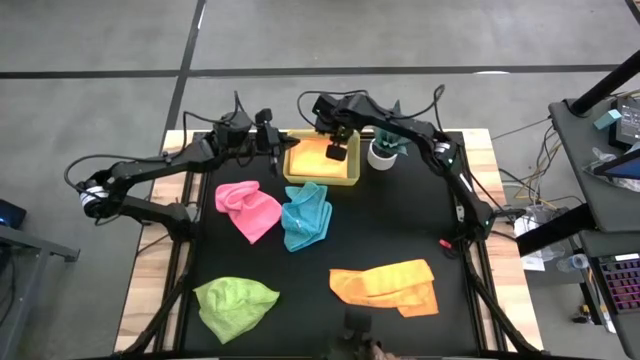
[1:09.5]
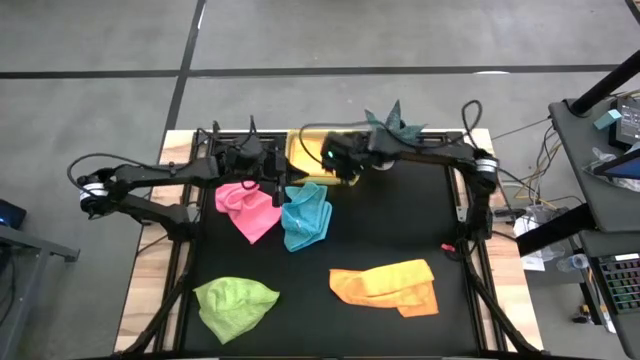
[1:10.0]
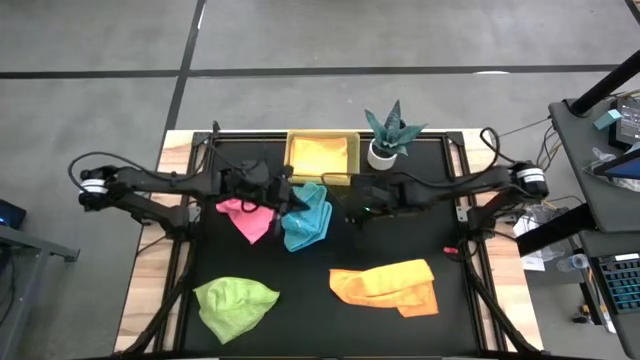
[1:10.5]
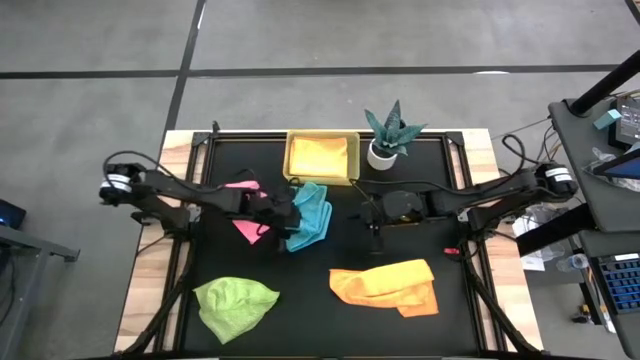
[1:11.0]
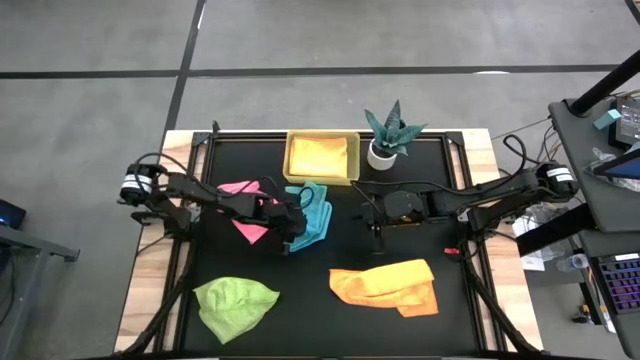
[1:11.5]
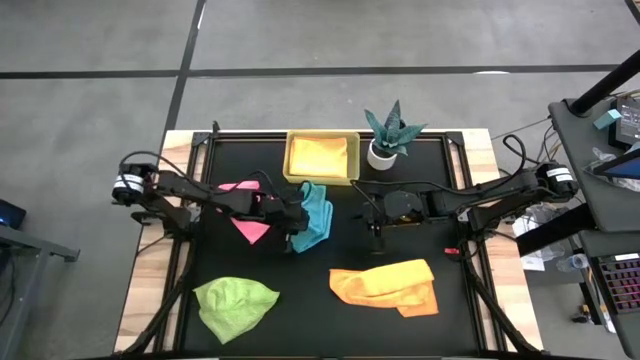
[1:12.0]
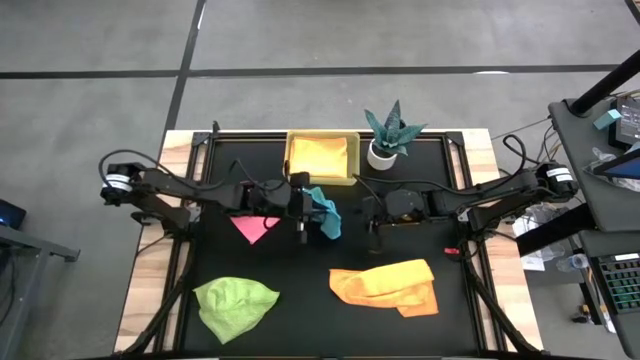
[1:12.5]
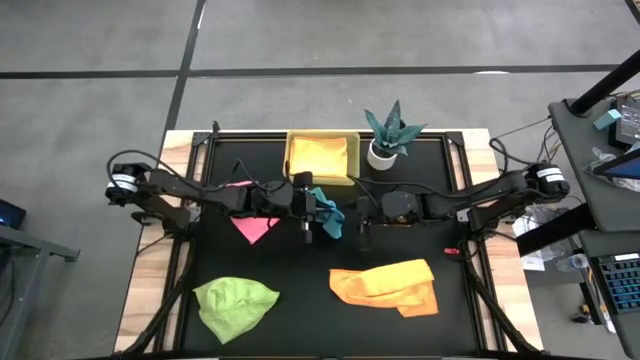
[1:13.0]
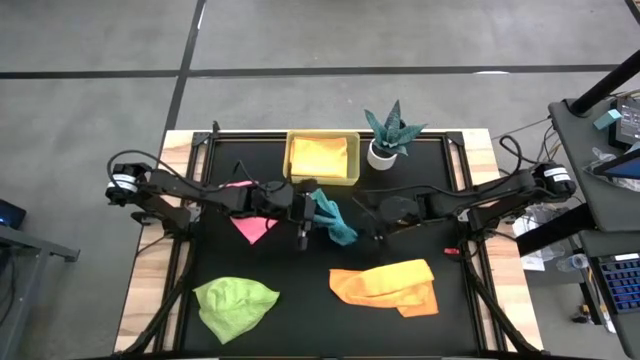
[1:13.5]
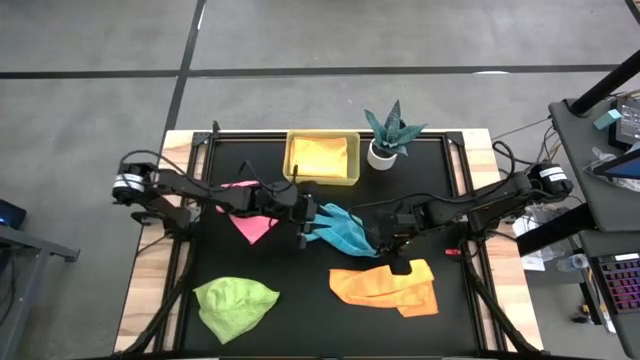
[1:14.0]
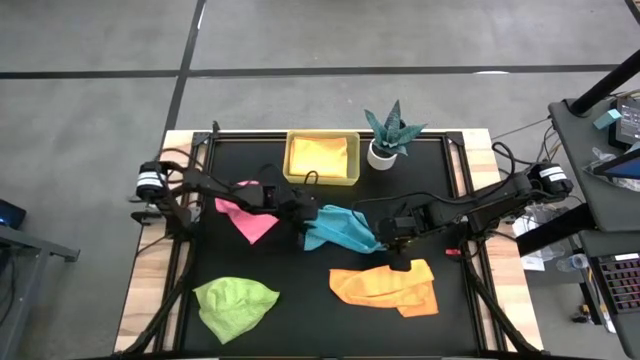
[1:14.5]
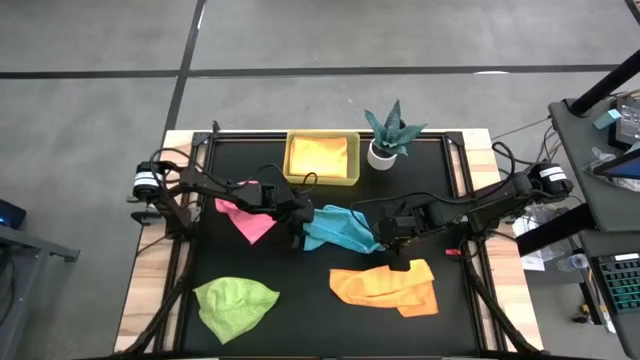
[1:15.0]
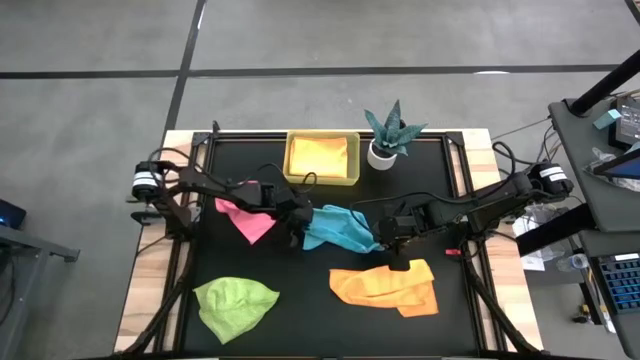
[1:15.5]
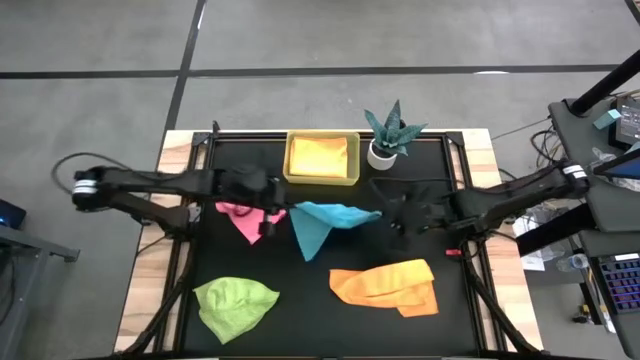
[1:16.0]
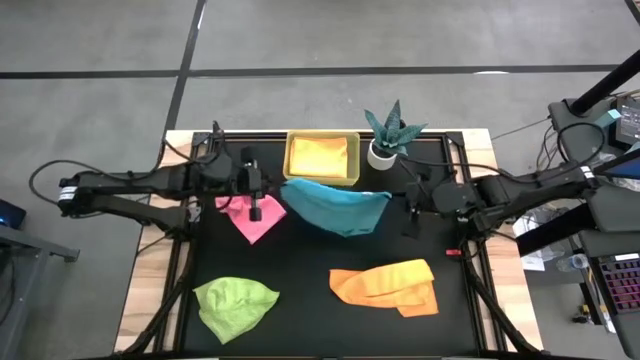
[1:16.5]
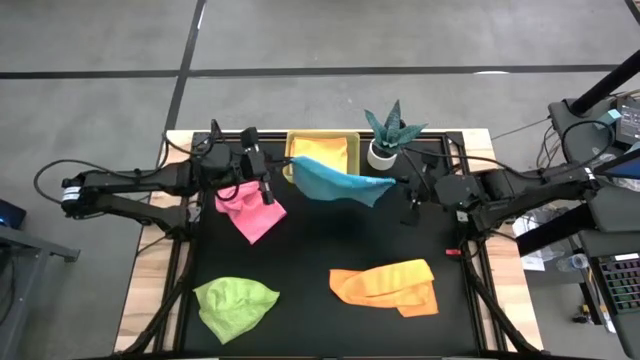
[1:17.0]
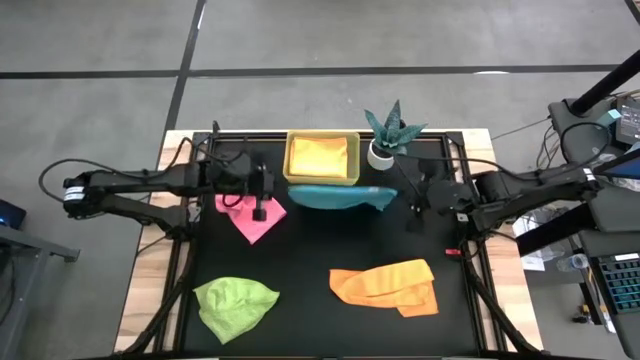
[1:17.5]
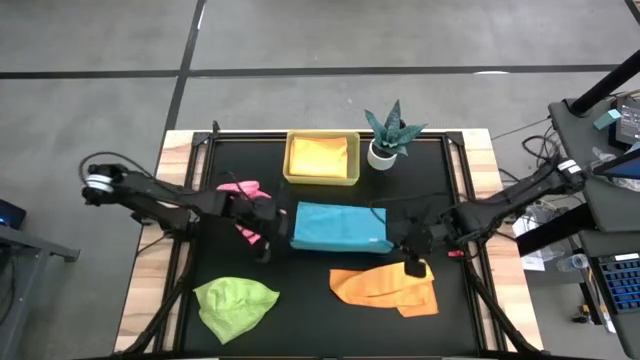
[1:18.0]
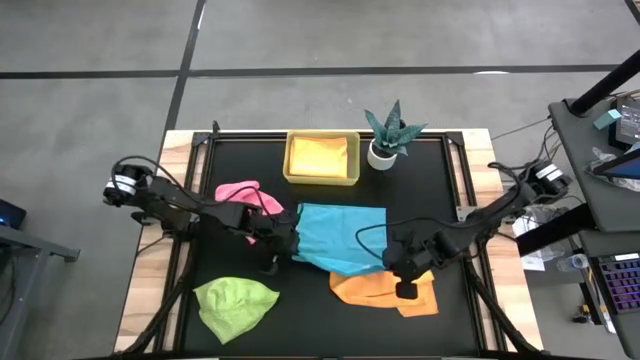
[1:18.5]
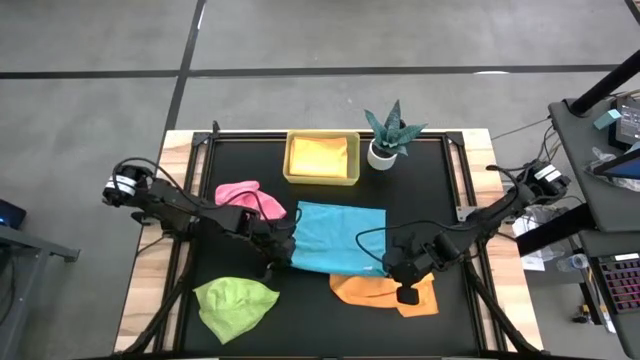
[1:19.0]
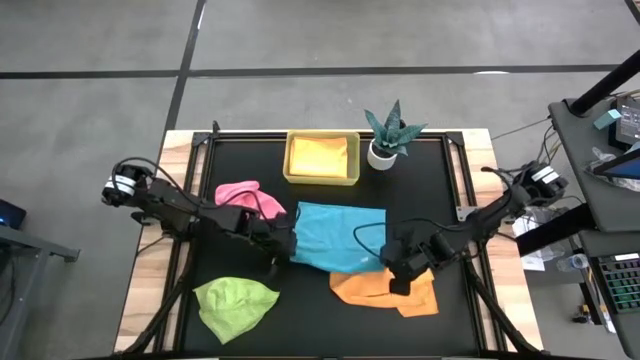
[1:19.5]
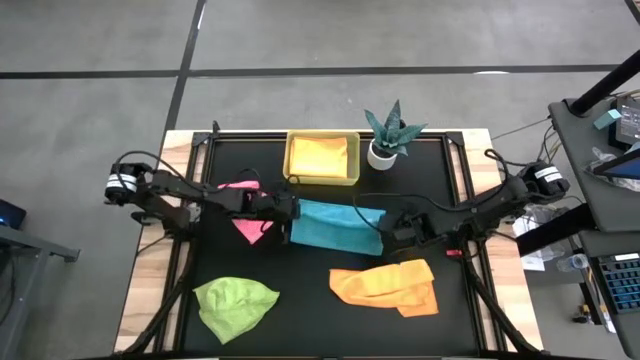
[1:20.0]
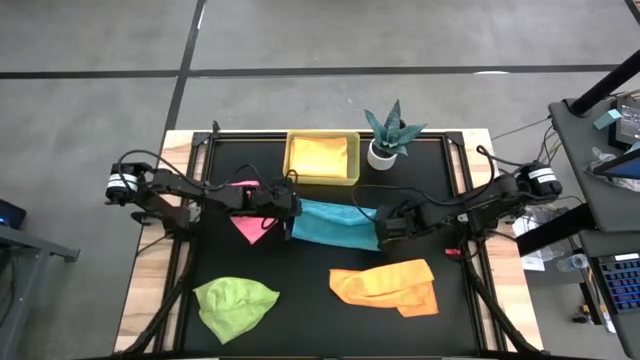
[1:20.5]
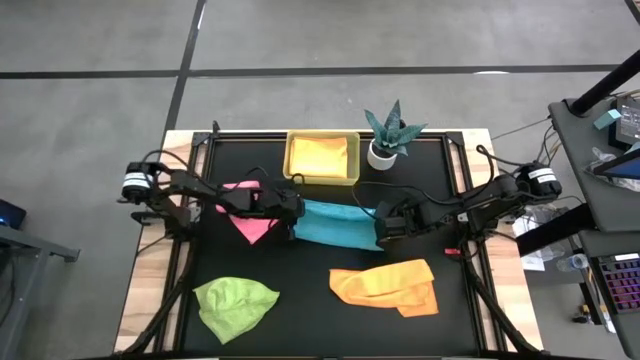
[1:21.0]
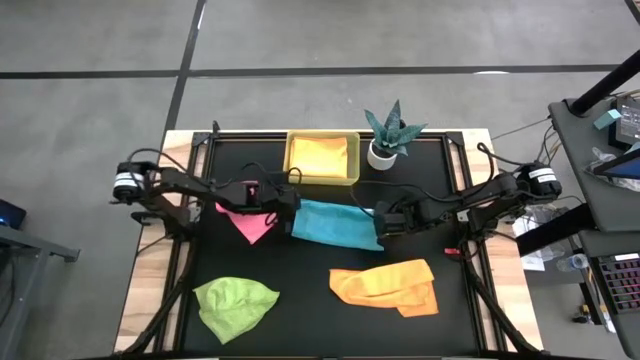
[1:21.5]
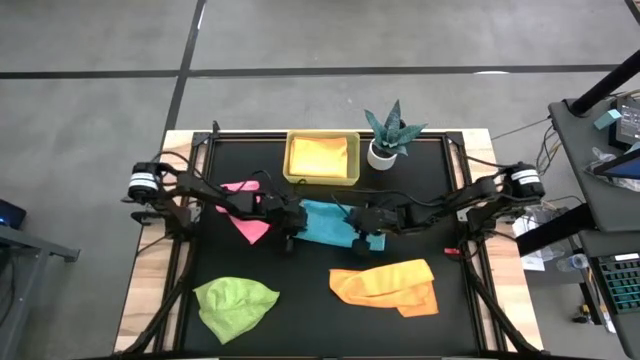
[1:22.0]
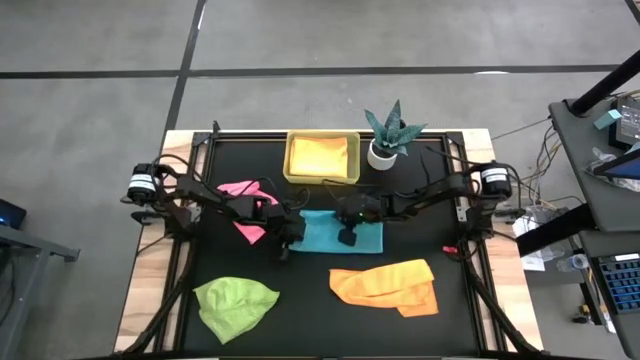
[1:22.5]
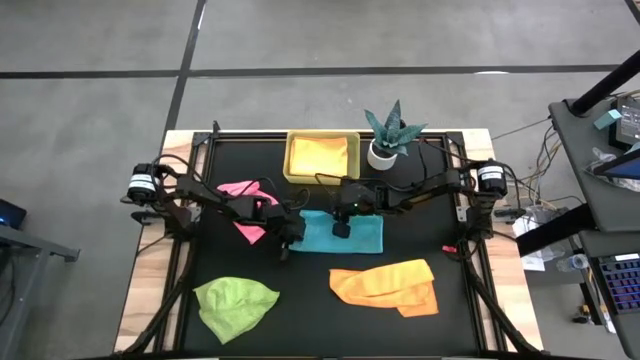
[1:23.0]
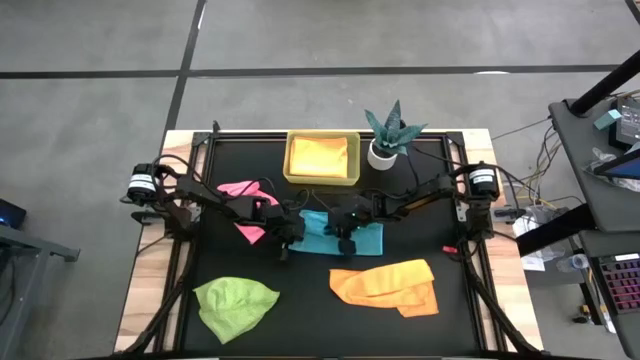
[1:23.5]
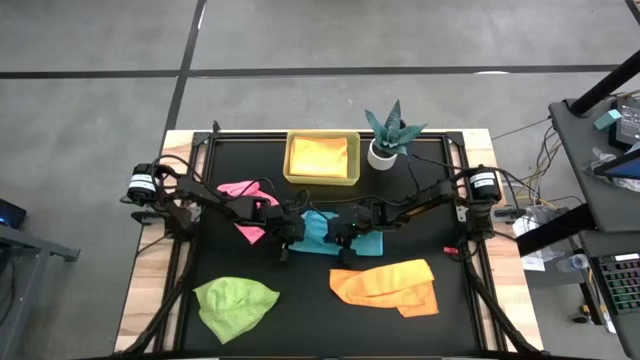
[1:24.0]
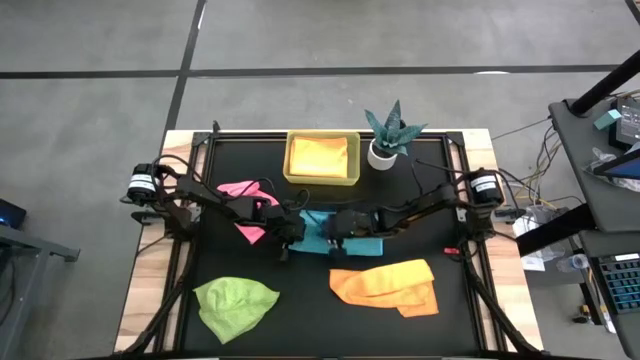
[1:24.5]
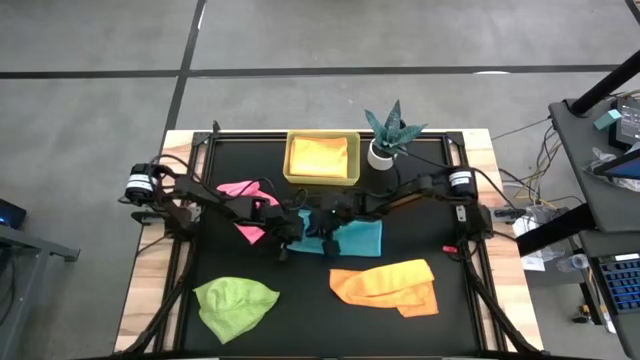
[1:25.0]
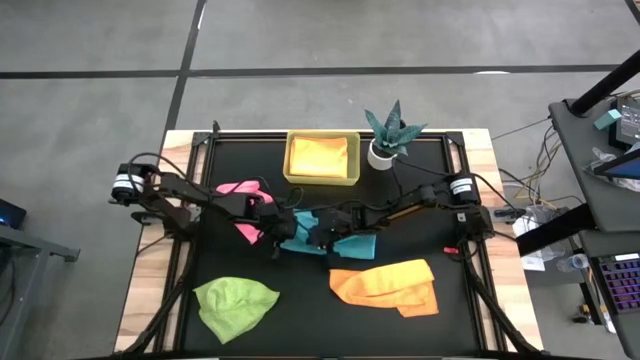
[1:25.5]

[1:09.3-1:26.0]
Task: Fold microfiber towels
Fold the blue microfiber cloth

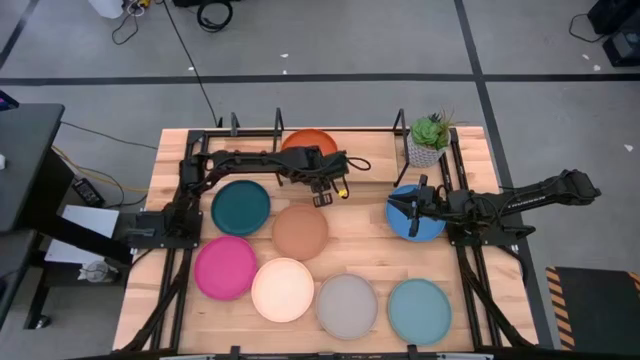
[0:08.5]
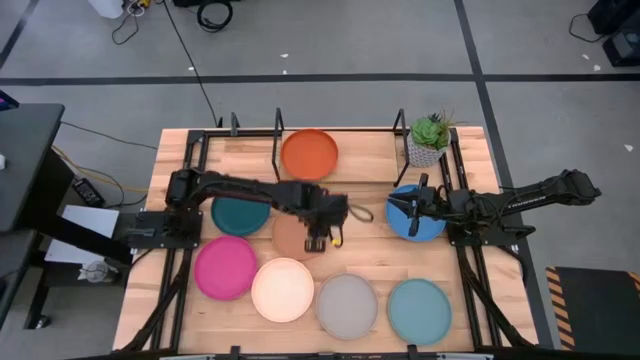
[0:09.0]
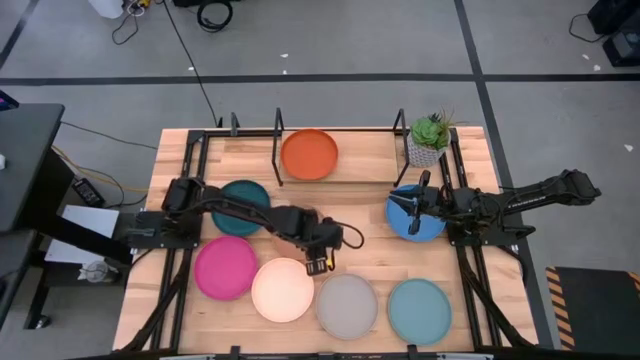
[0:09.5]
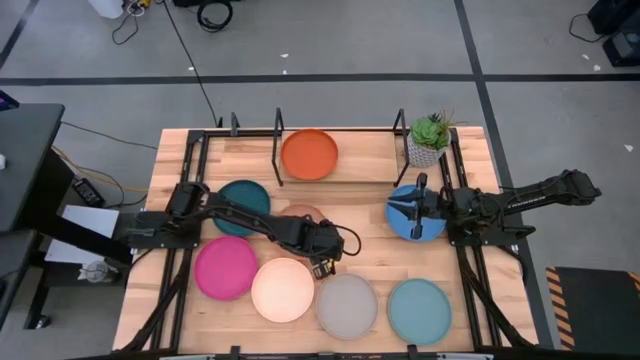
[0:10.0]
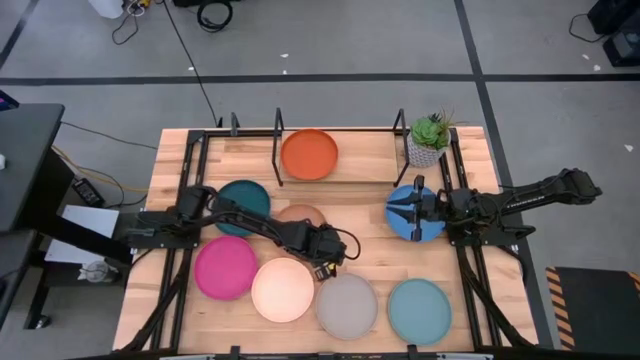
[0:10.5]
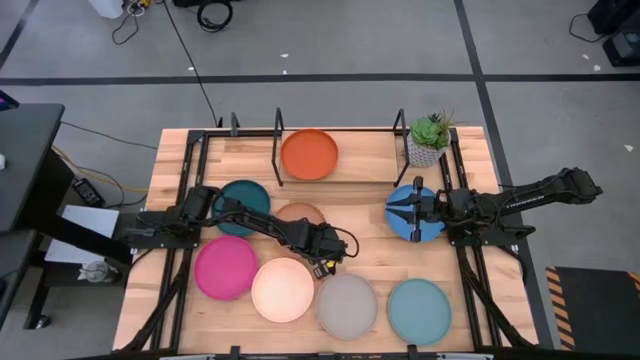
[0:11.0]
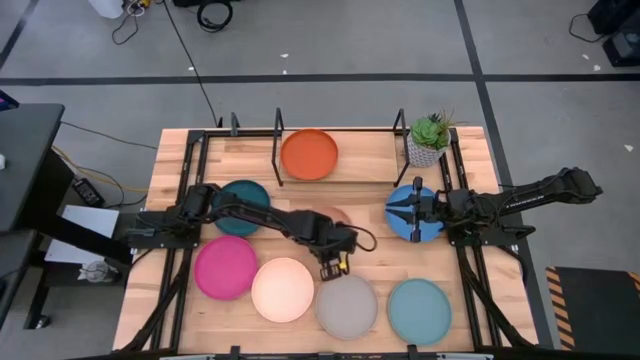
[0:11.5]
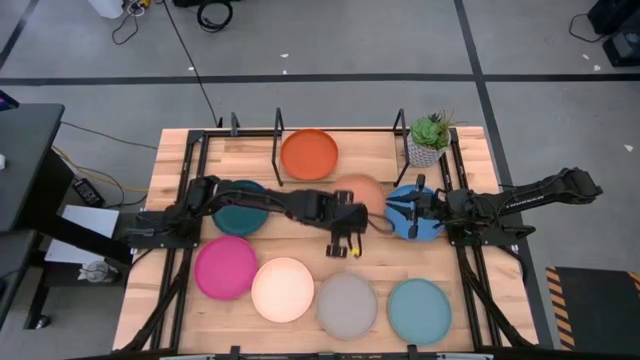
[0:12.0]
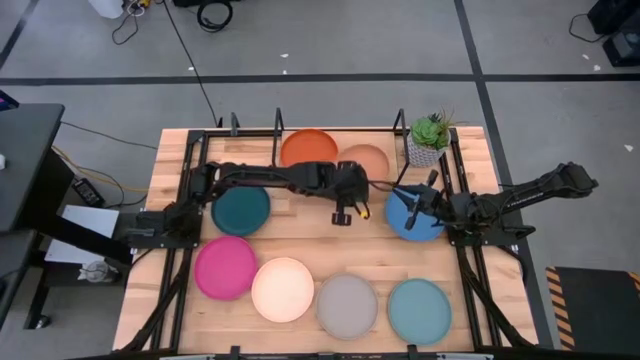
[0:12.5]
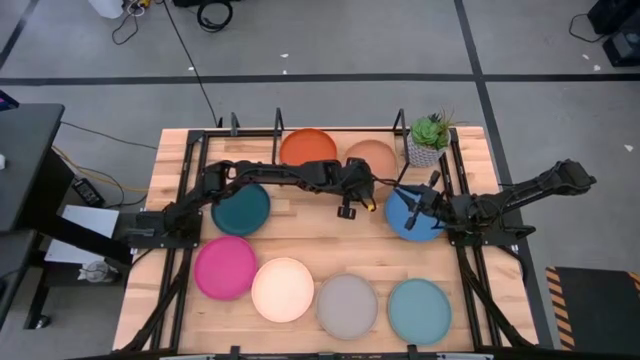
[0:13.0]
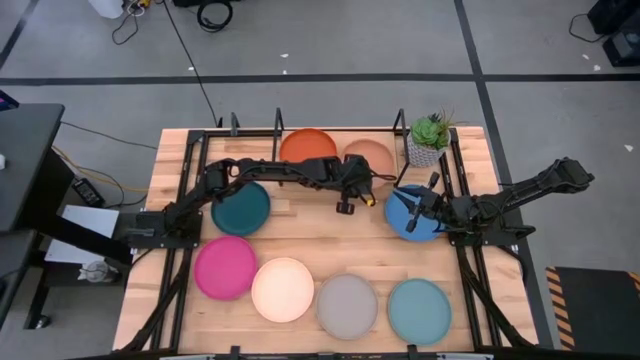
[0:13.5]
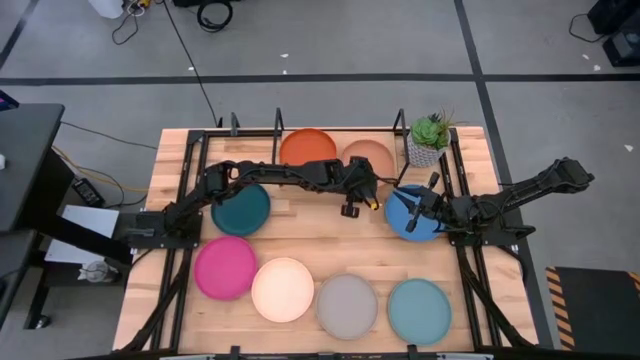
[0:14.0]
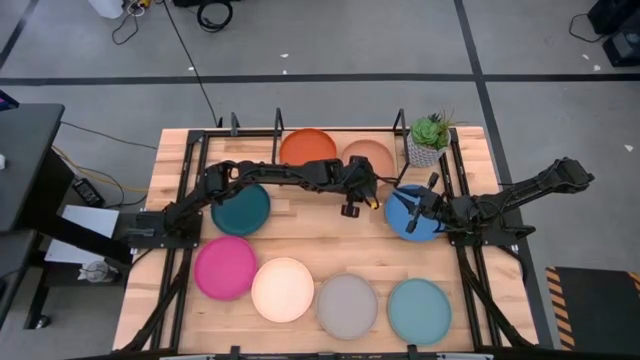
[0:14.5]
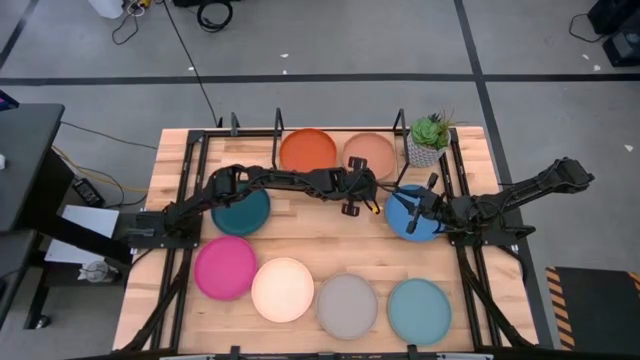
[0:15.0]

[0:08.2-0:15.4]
Task: Place and stack plates onto a shelf
Put the brown plate on the shelf
